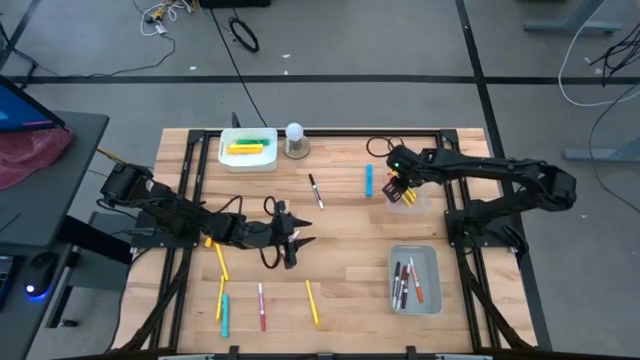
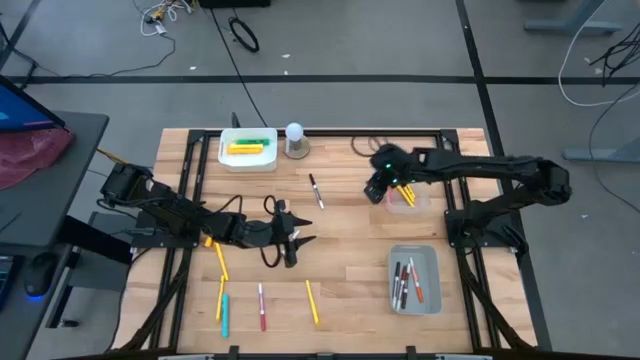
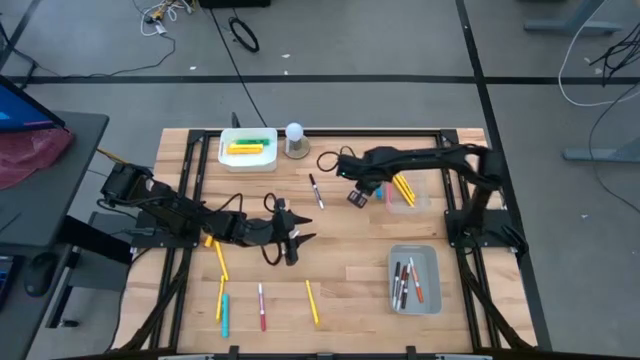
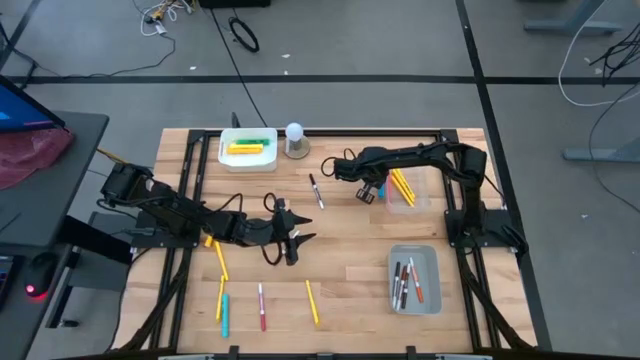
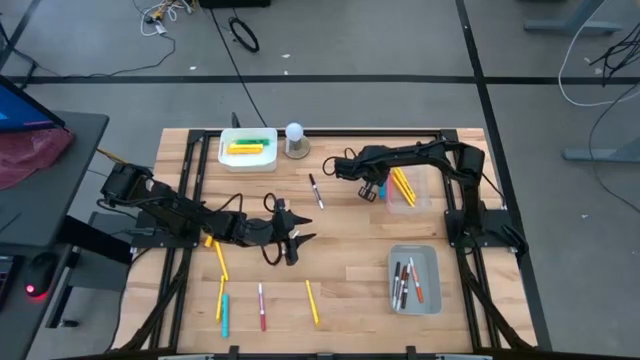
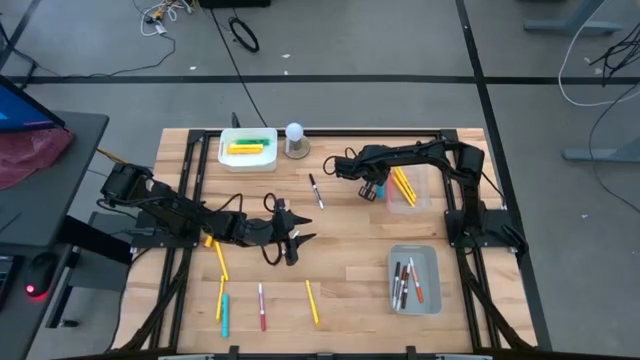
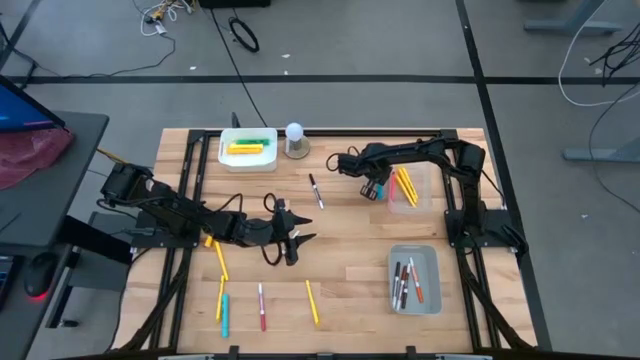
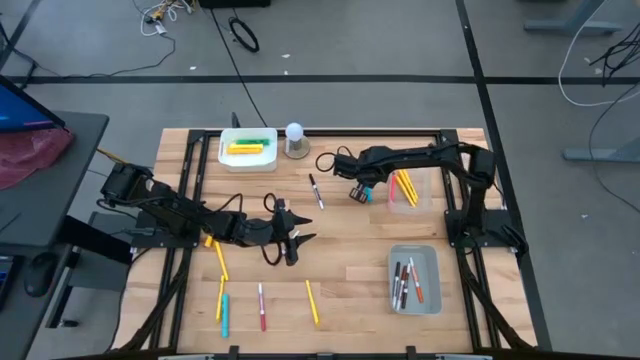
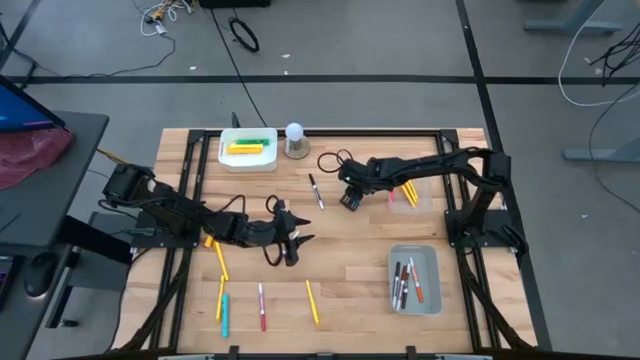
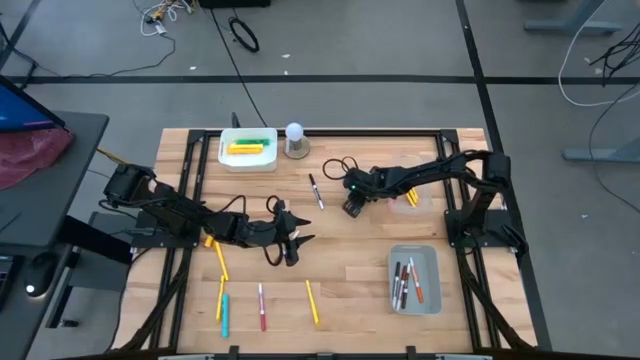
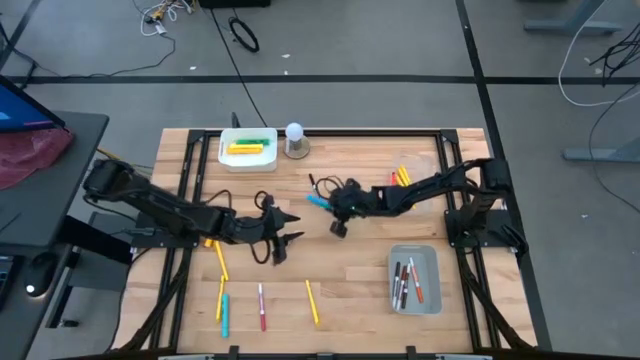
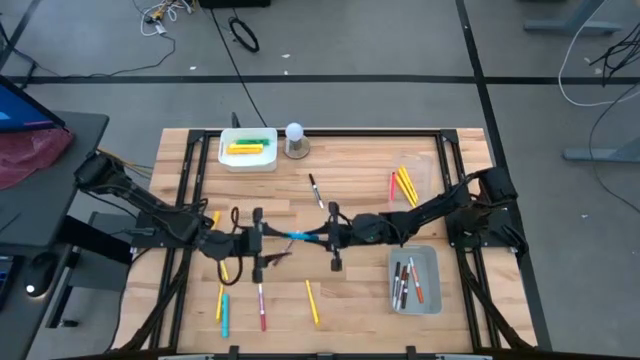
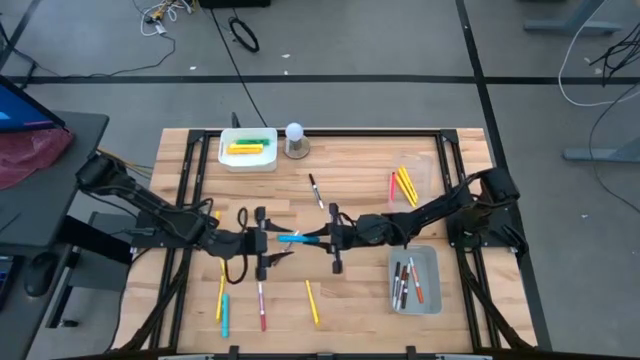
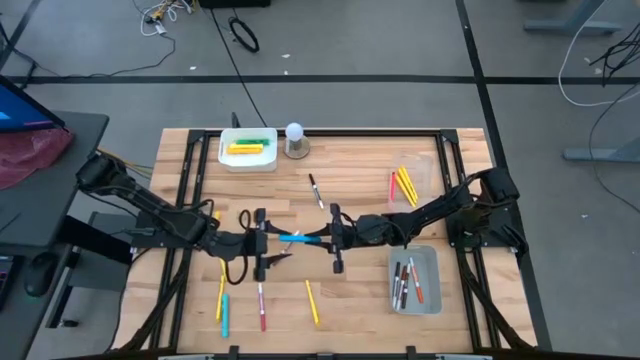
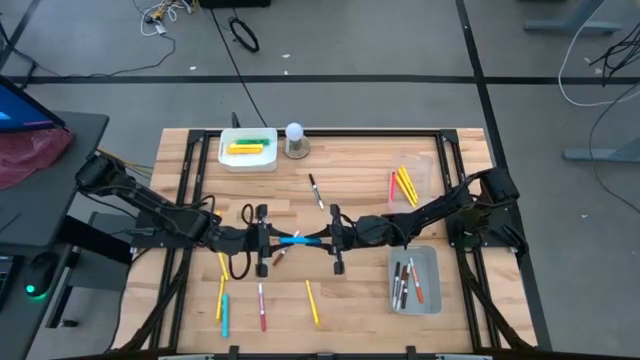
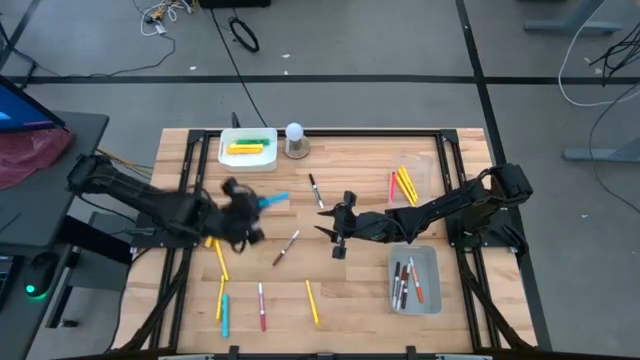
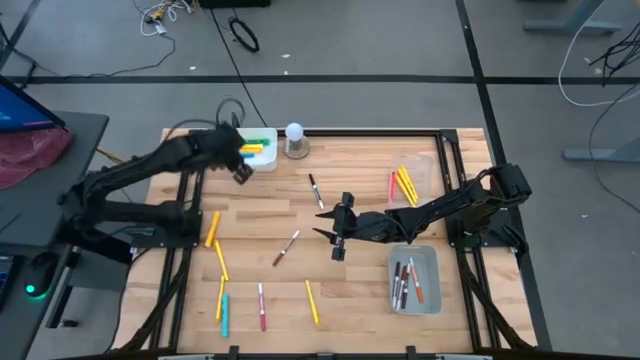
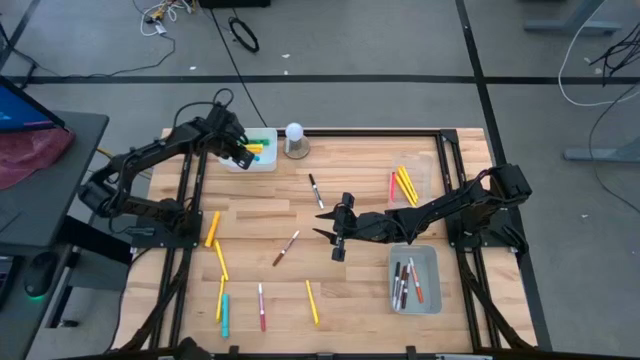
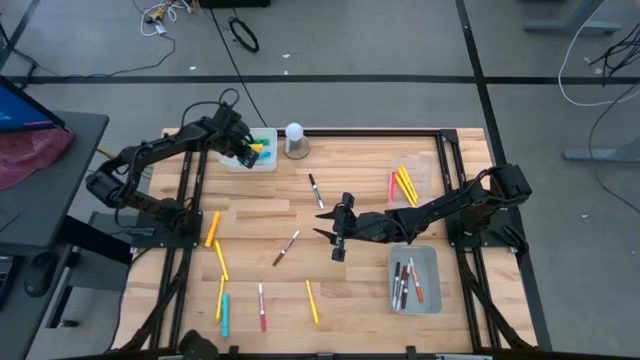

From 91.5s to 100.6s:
Task: Pick & Place Markers
Put the blue highlighter into the white bin

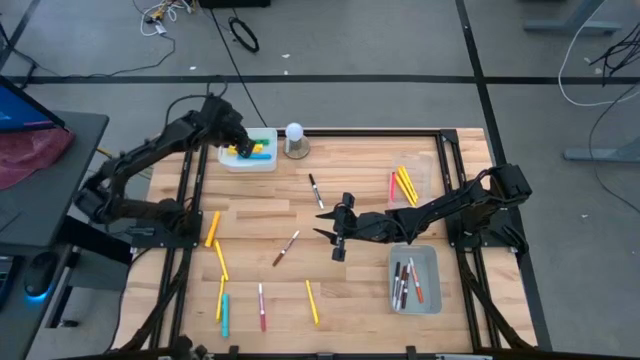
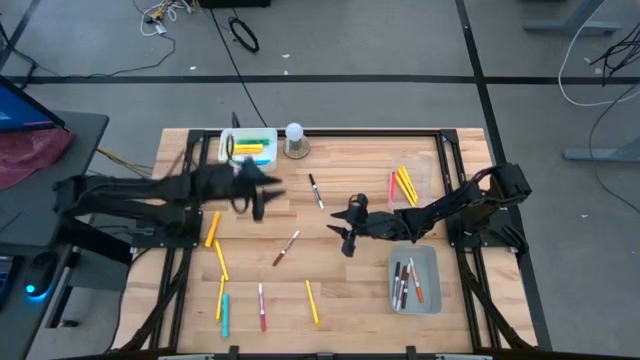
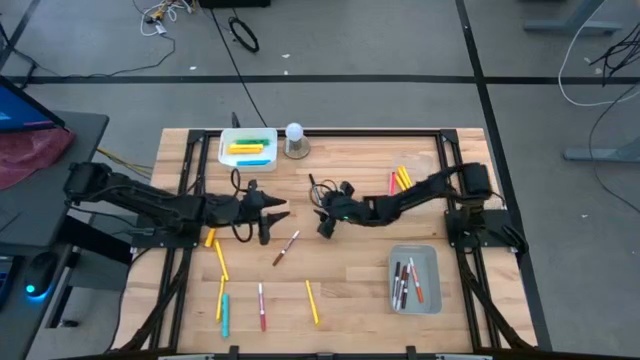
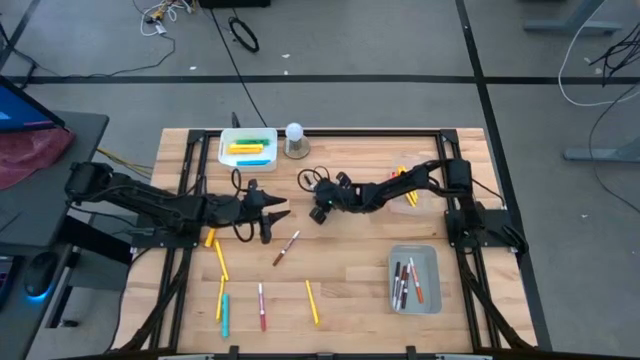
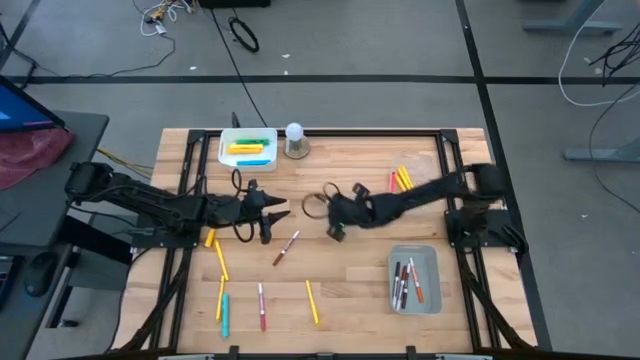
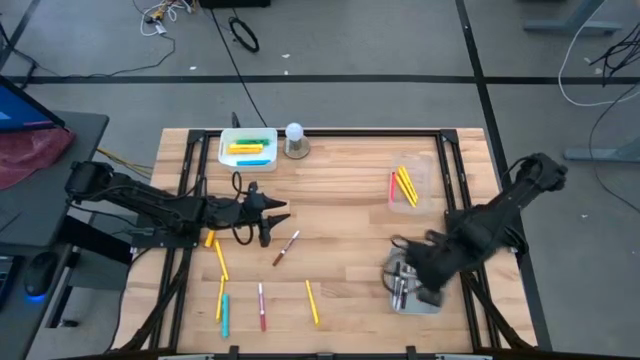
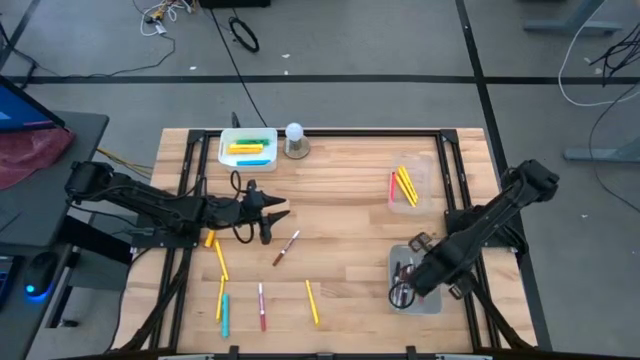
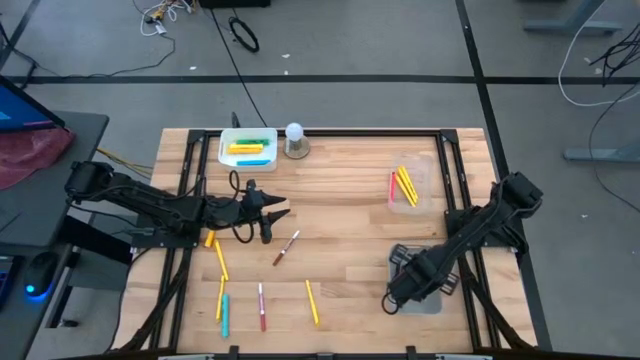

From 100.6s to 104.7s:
Put the black marker pen into the gray bin

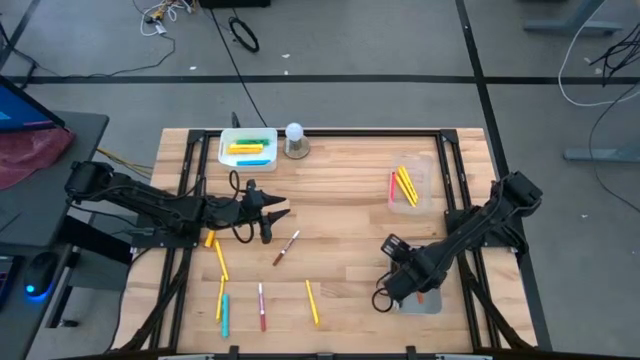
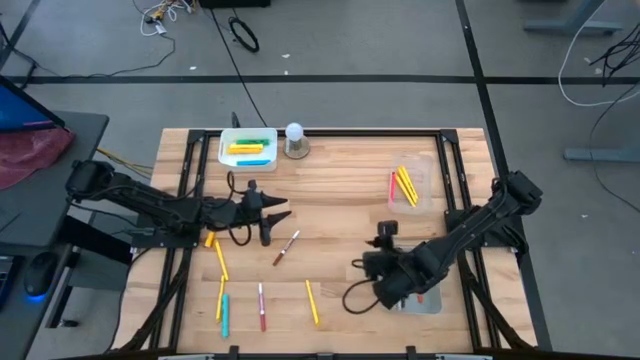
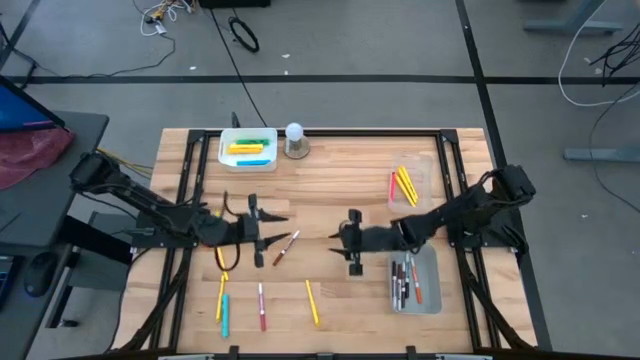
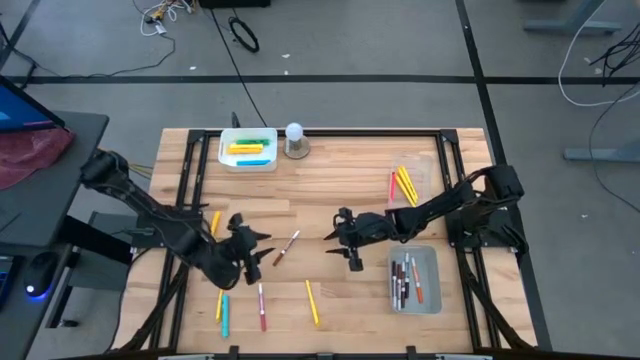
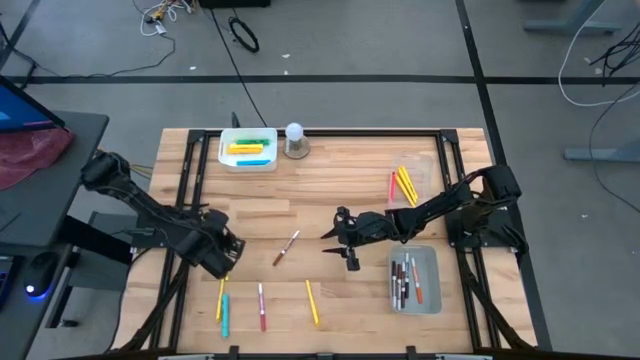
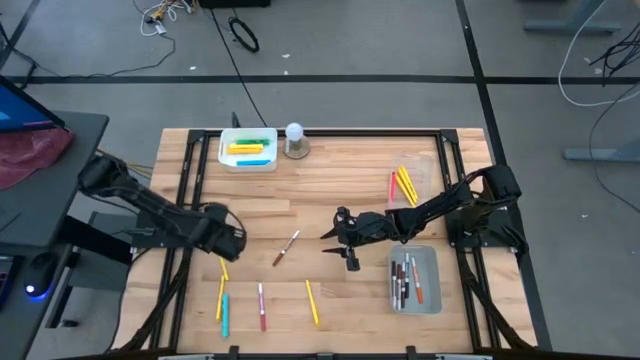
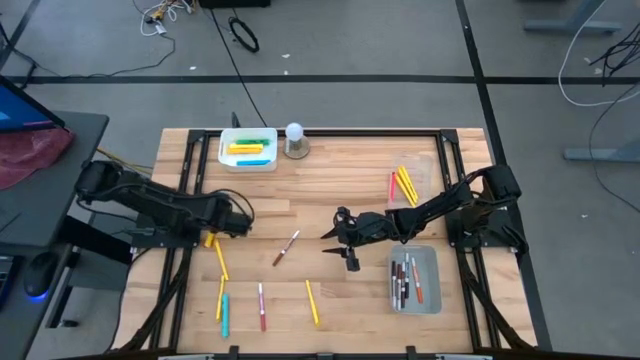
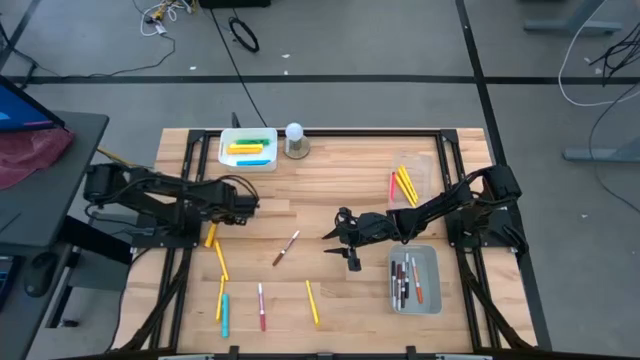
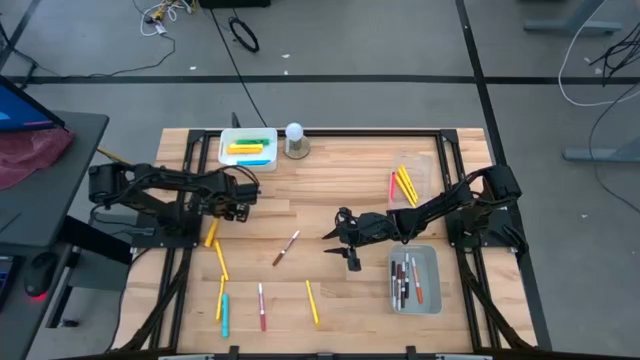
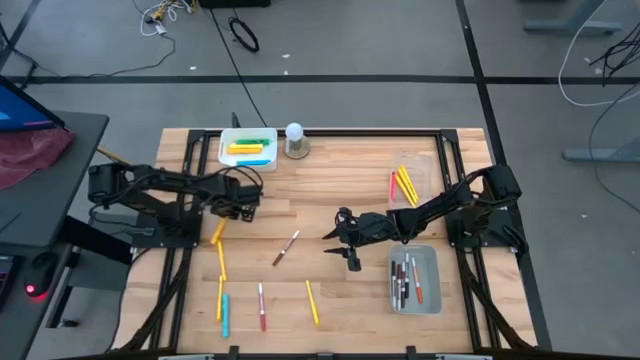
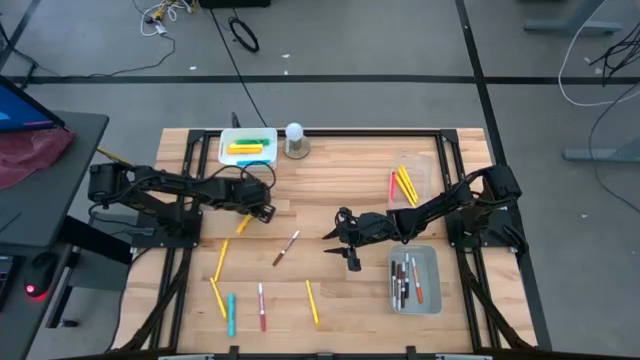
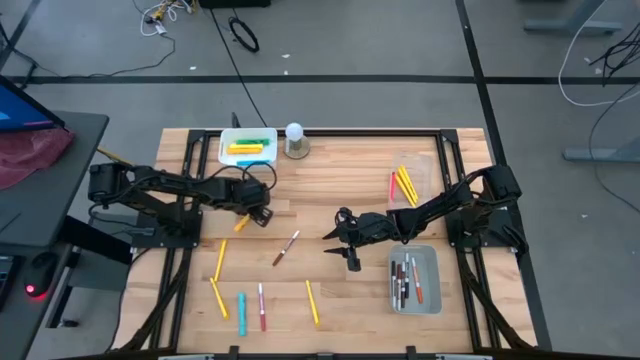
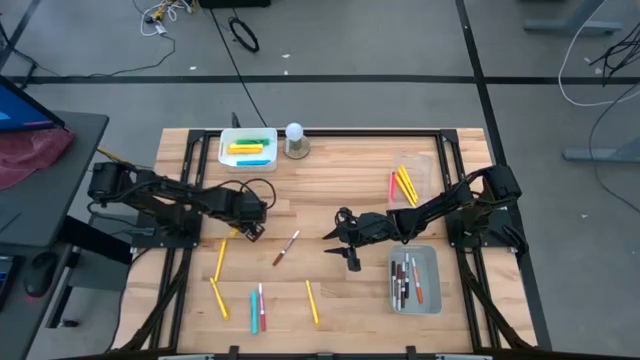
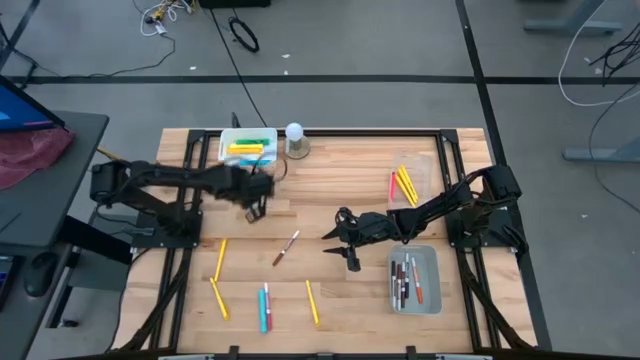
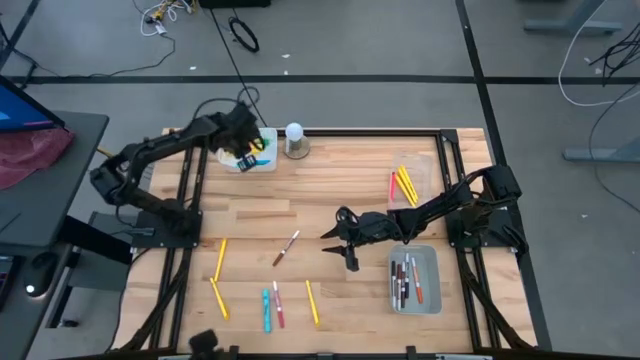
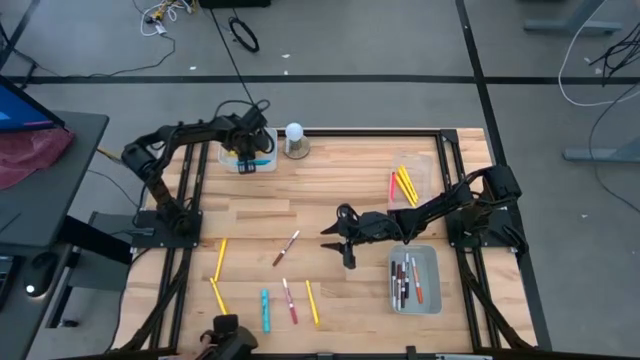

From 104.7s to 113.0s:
Put the yellow highlighter into the white bin
